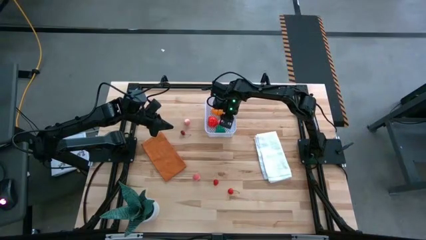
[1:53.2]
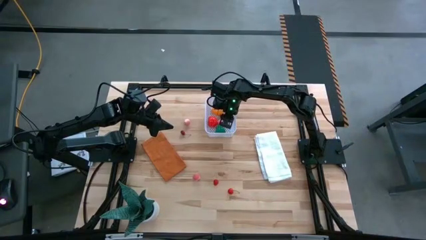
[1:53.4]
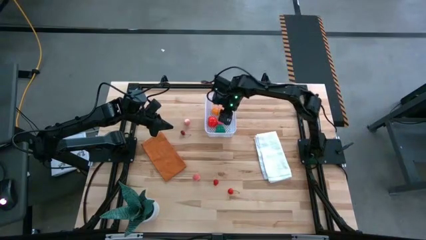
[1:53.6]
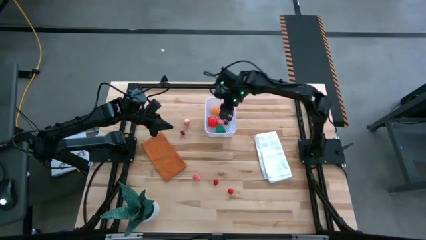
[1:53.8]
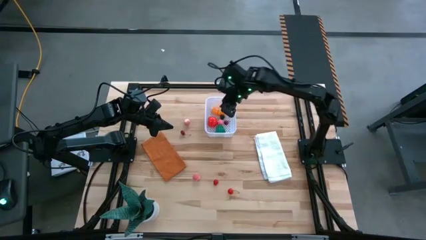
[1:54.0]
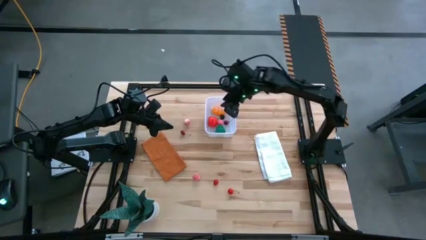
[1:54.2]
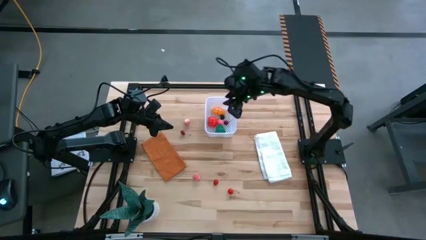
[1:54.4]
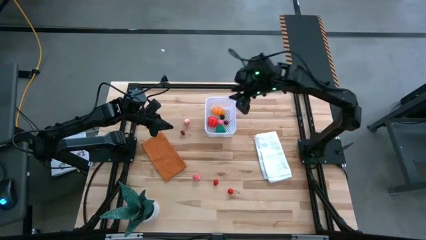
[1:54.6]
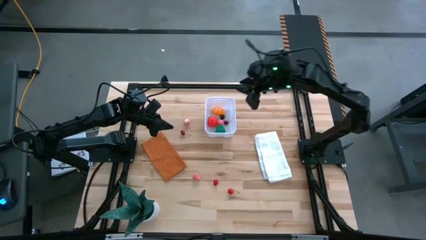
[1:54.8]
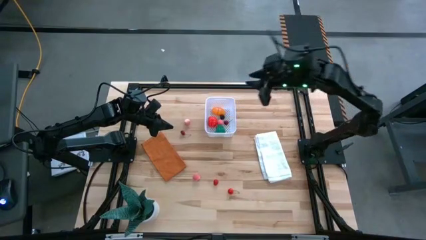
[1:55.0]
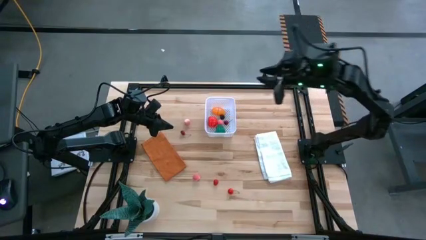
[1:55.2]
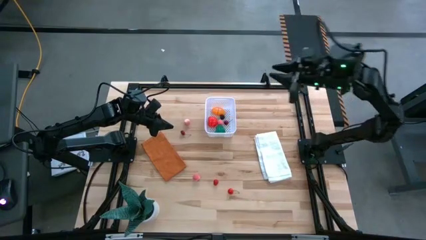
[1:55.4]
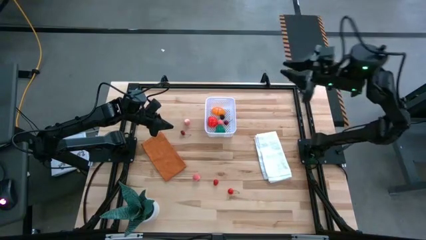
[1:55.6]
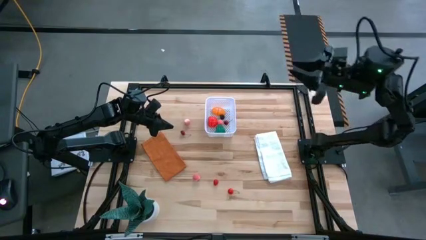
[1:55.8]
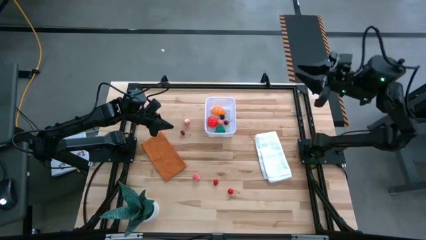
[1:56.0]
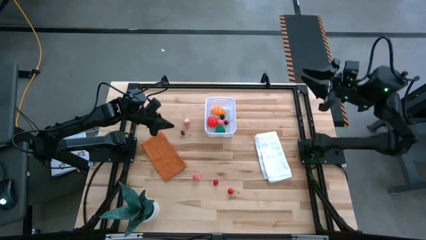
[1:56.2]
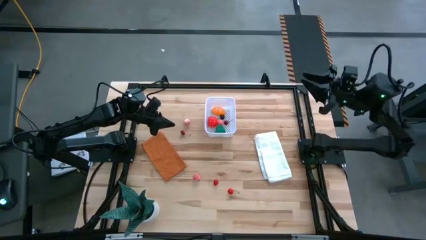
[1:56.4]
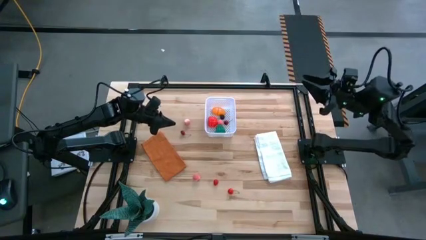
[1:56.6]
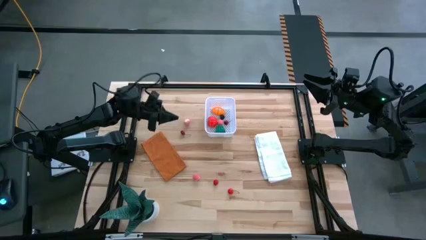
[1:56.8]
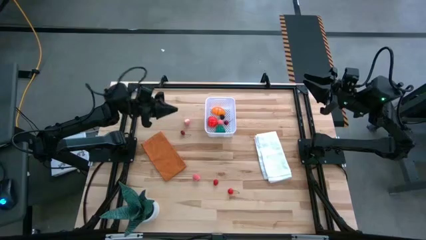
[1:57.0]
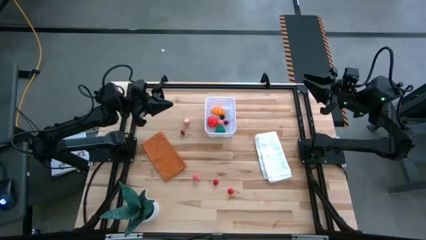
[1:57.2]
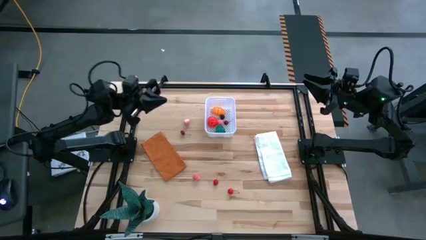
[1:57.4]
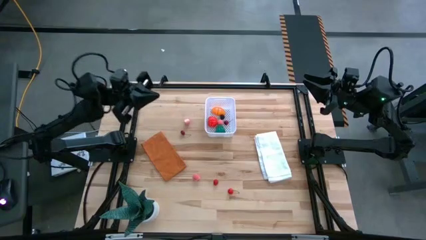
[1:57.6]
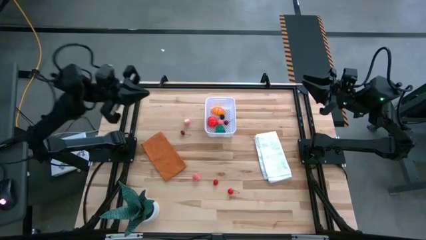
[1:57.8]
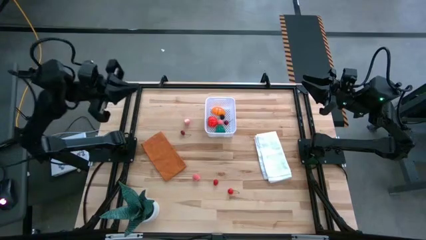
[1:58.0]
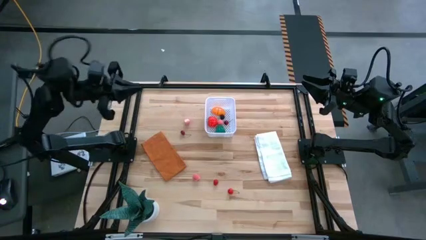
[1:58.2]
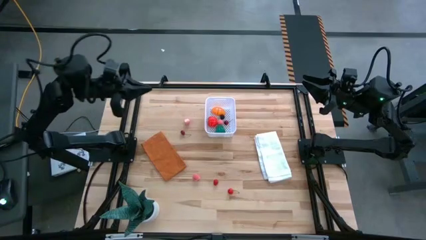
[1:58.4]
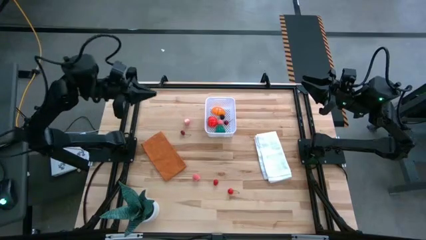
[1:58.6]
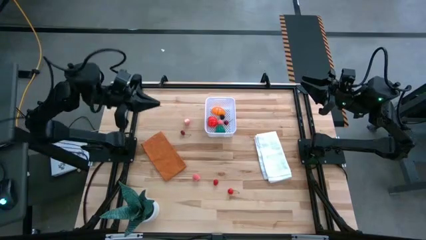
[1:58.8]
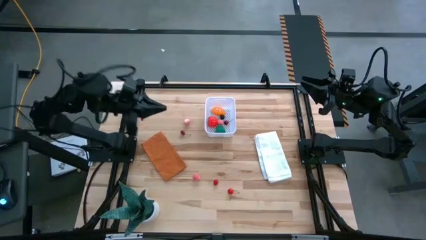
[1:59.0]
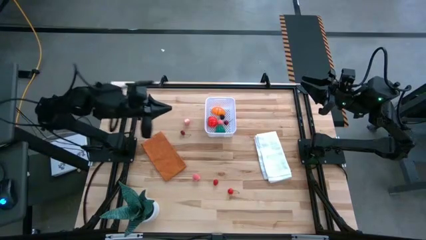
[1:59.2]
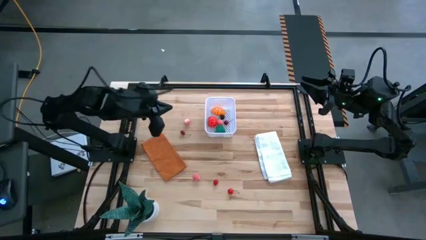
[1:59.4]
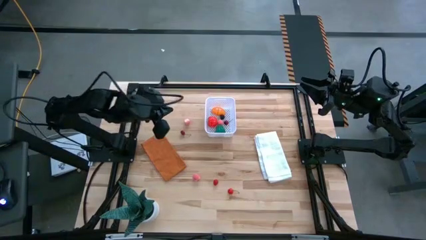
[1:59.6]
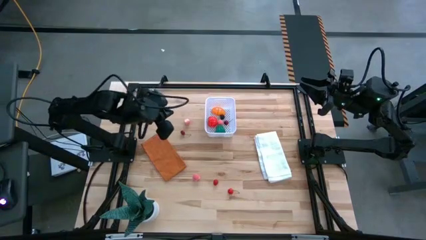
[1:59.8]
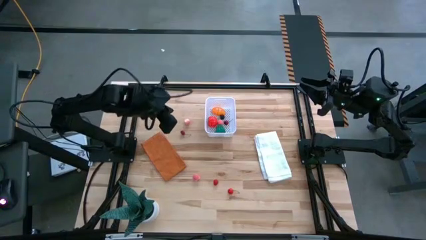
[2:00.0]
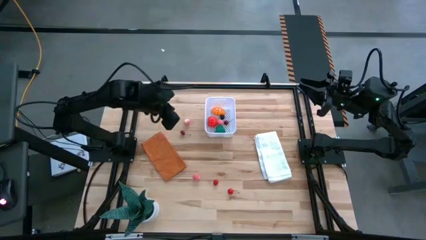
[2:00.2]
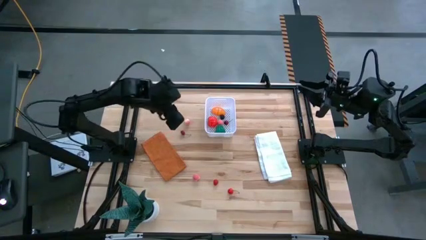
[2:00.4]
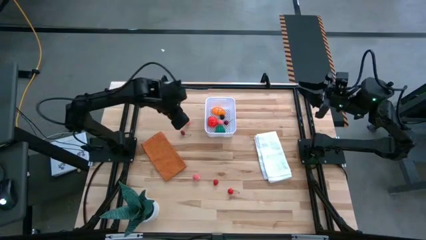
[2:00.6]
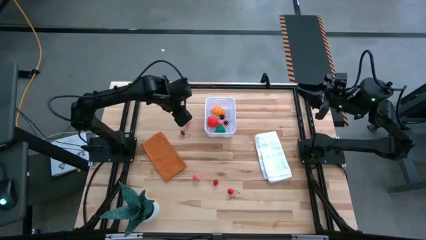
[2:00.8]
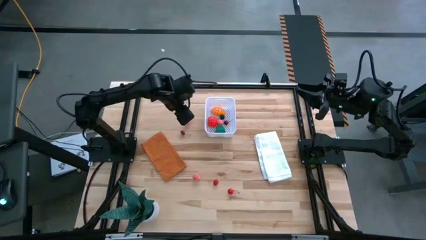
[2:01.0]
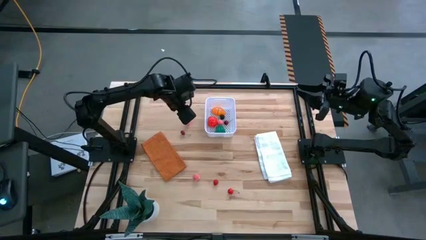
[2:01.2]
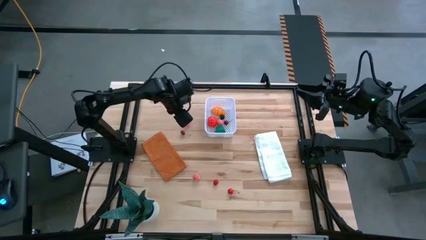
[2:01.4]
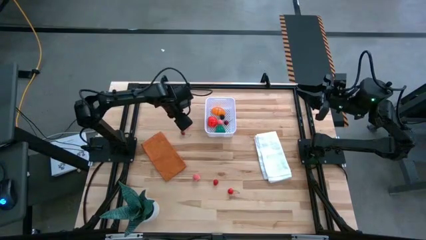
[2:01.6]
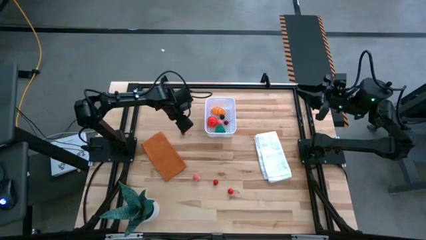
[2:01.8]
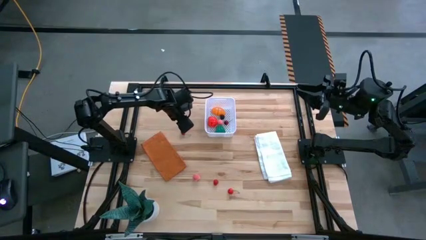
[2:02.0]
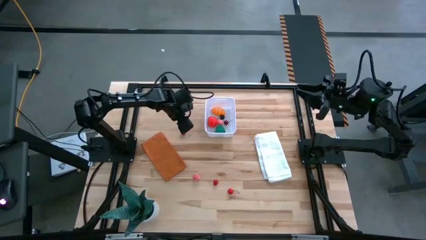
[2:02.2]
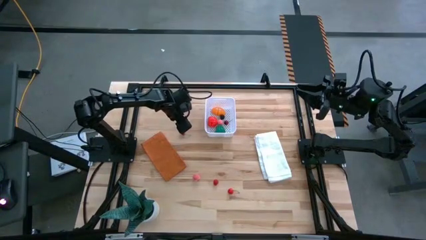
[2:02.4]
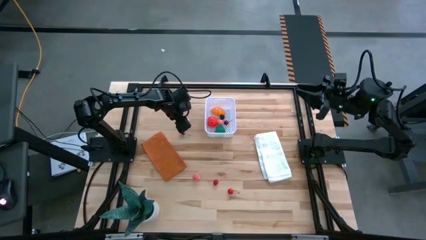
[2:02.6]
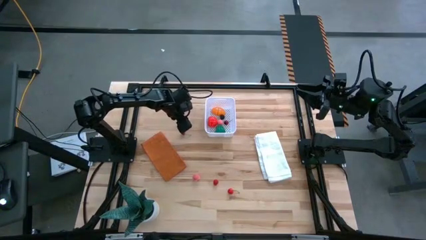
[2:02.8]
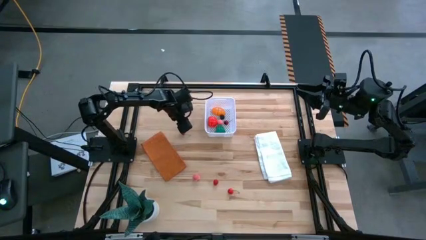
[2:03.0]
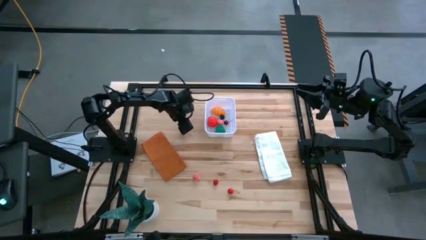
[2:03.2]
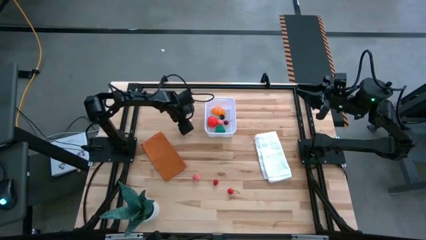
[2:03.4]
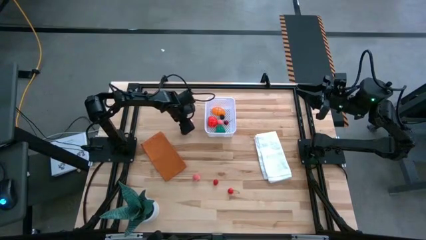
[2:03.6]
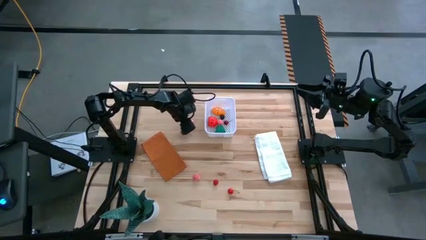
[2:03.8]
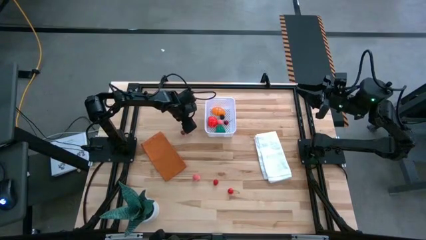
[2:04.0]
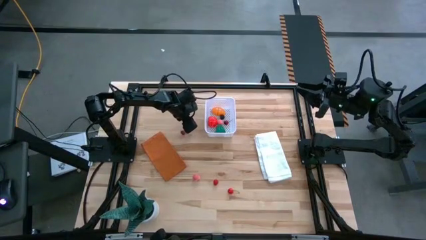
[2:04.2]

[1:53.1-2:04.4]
Task: Pick and placing Produce into tupperware
Put the peach into the white bin

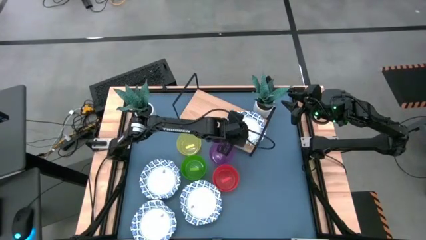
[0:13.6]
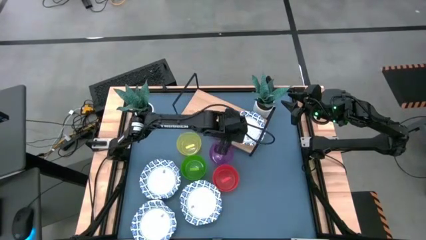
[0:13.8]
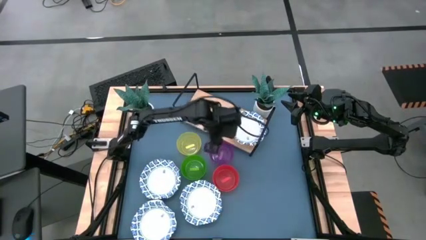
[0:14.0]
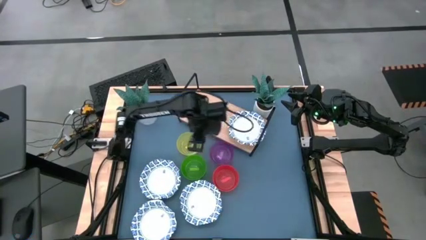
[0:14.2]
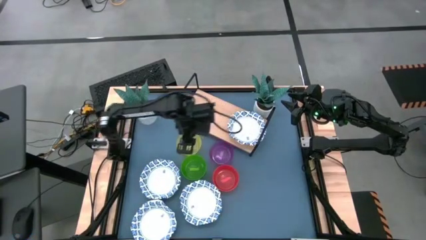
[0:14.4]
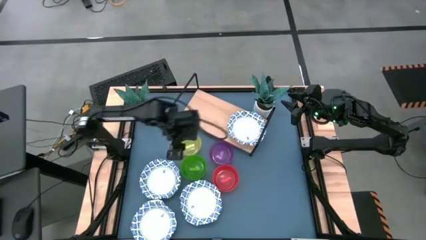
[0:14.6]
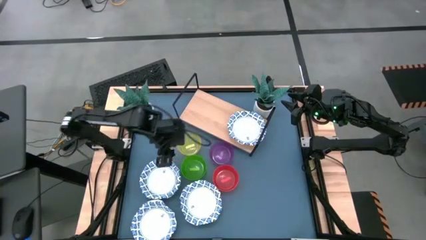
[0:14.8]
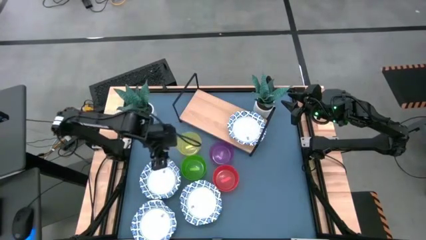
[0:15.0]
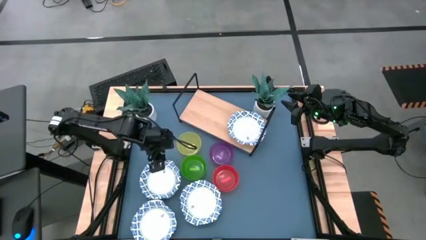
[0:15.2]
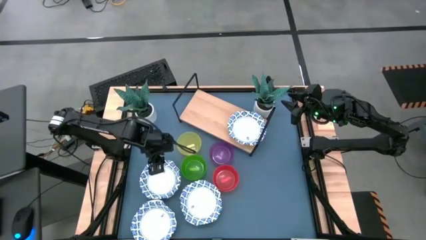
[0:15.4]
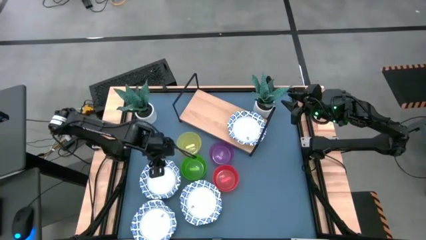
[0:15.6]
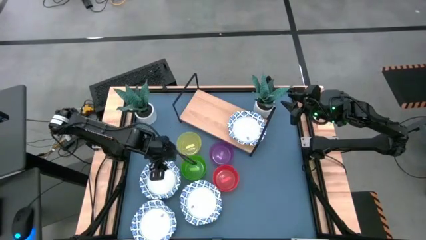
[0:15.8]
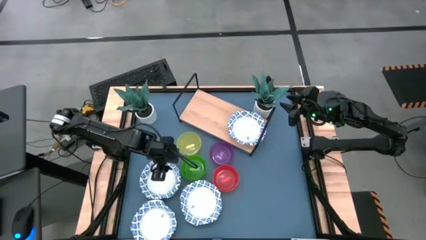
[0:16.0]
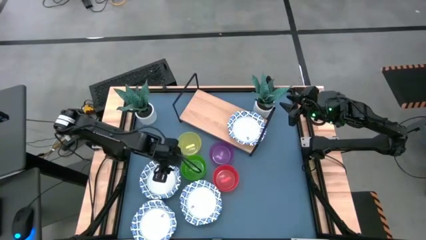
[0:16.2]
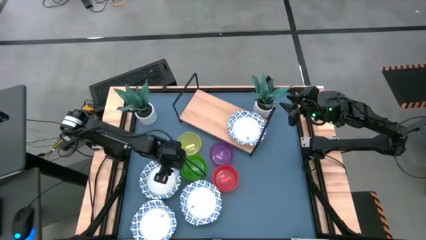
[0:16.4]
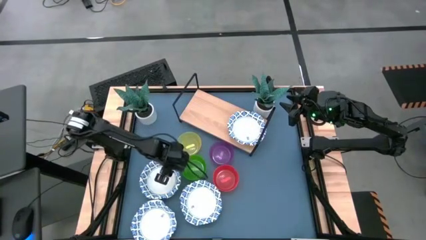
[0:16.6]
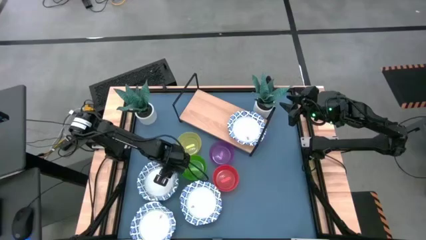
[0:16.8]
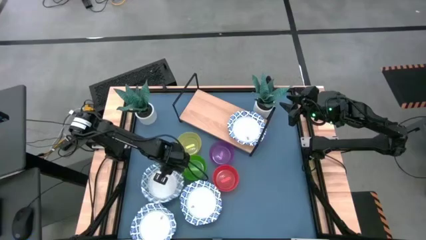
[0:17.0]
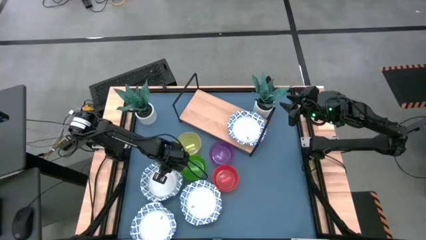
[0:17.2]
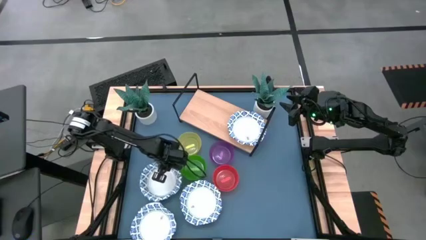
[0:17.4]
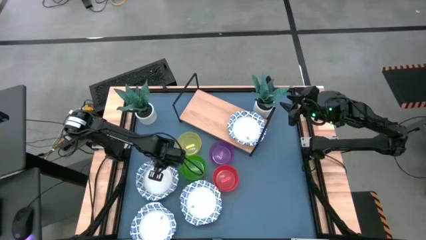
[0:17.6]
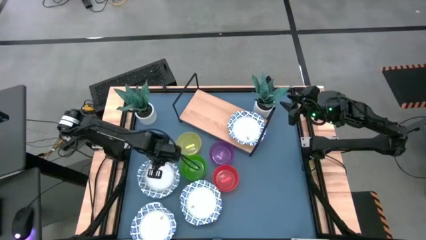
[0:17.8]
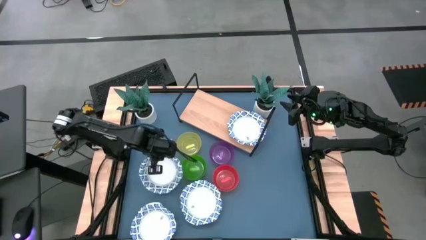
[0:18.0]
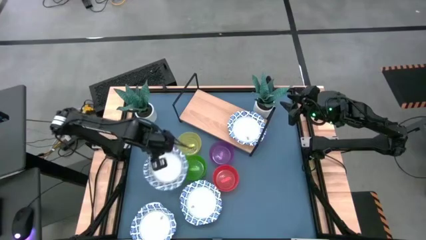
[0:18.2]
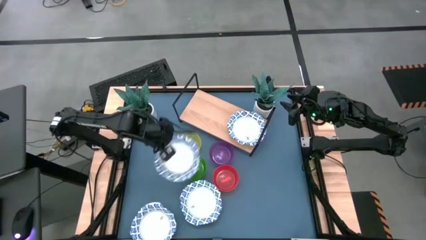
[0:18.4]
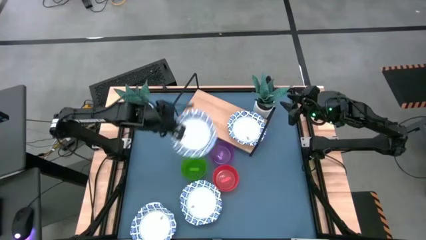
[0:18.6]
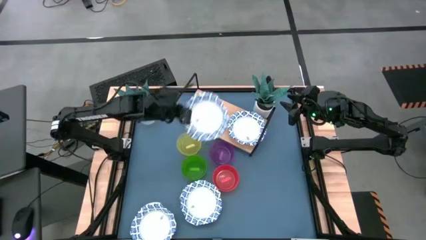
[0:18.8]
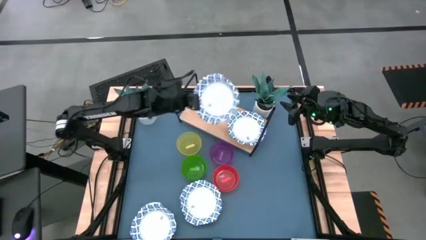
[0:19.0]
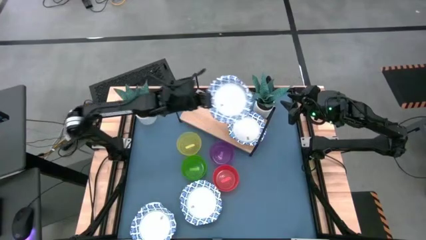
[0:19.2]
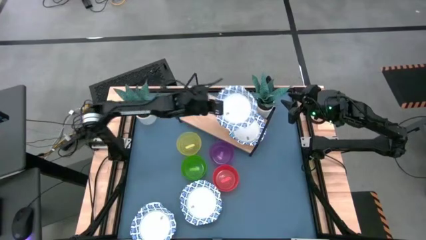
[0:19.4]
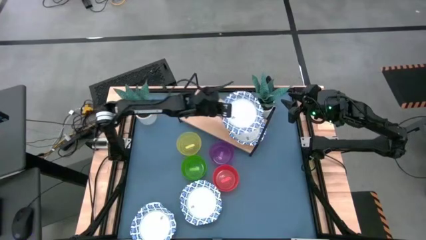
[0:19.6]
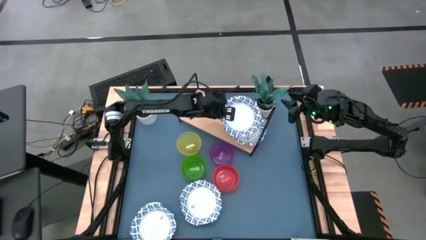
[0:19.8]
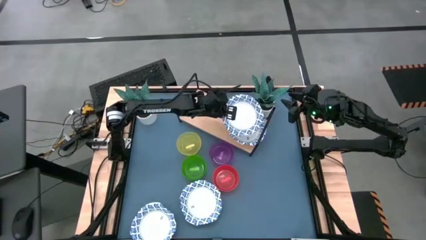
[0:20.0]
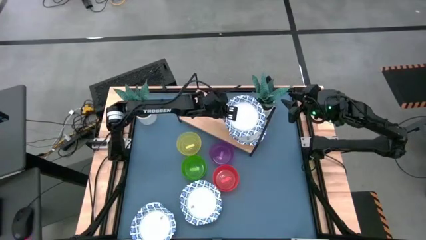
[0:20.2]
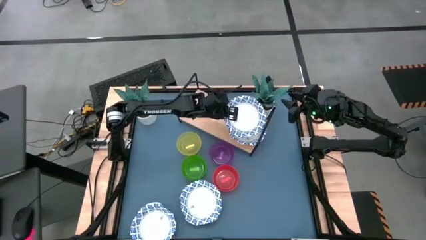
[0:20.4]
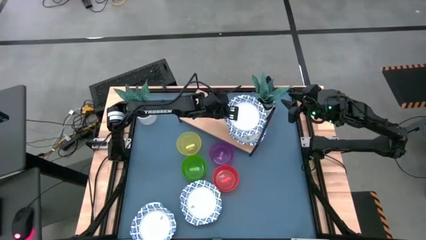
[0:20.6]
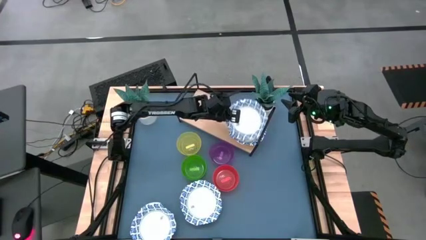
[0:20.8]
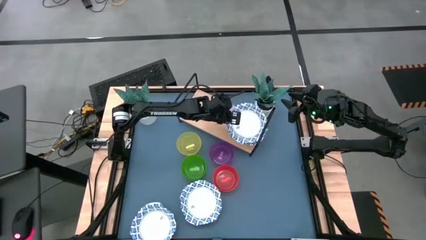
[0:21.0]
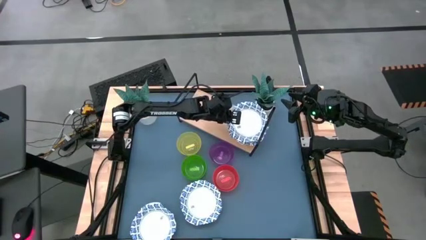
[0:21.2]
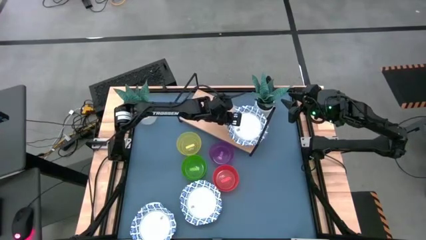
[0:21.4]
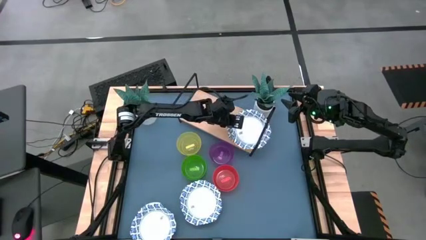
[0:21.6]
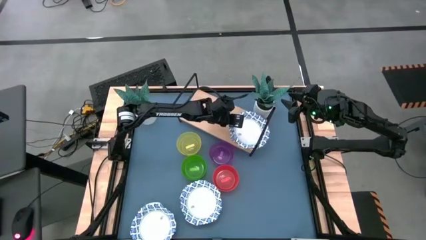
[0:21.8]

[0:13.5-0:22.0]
Task: Place and stack bowls onto a shelf
Stack blue pattern plate on top of the blue pattern plate on the shelf
